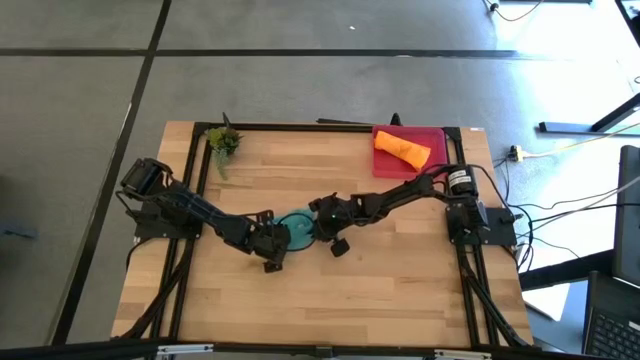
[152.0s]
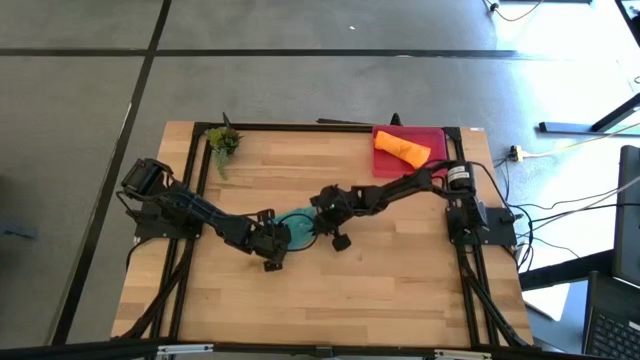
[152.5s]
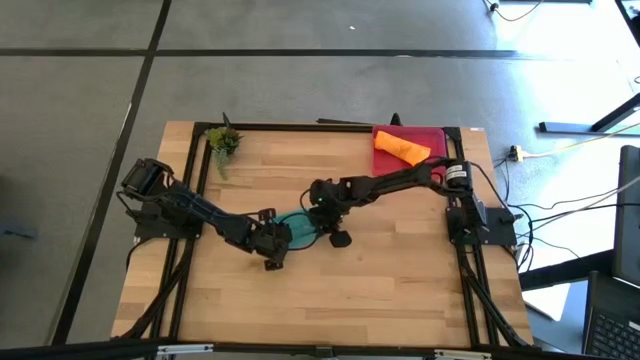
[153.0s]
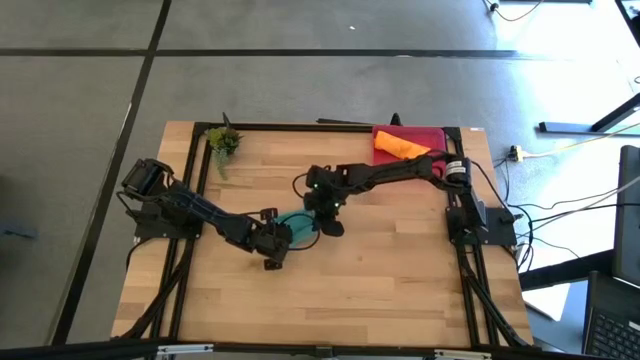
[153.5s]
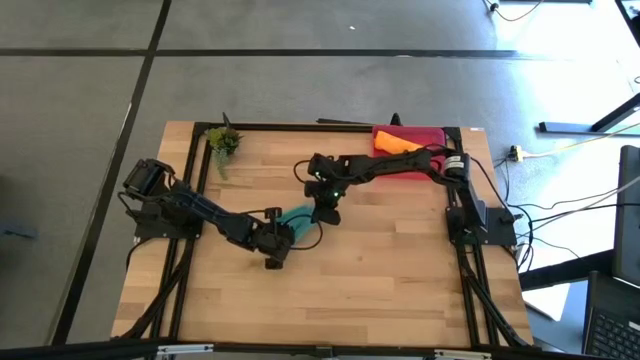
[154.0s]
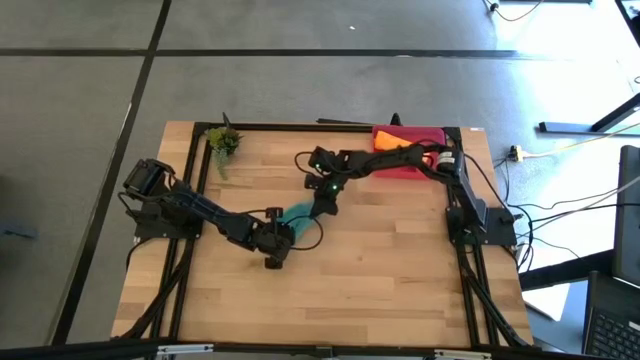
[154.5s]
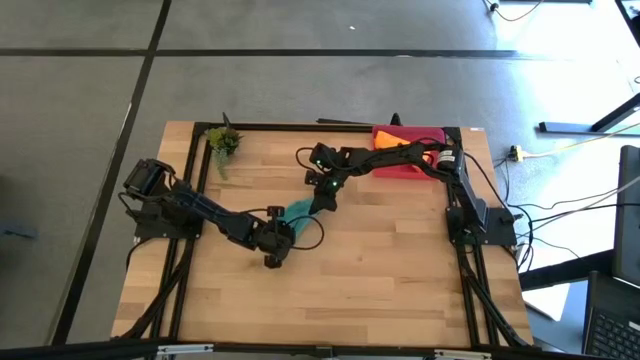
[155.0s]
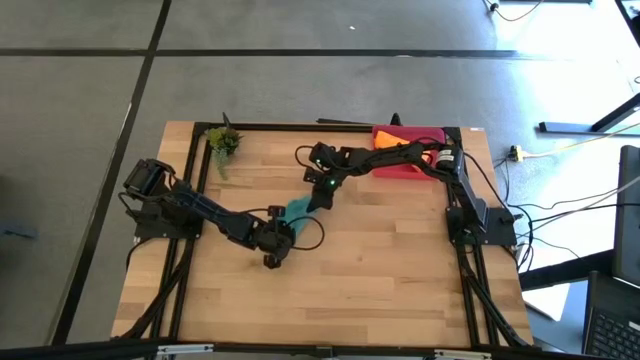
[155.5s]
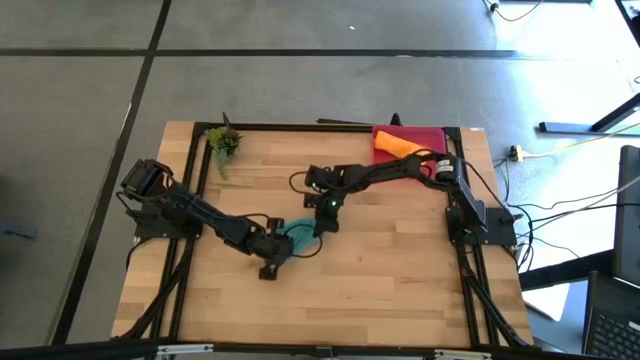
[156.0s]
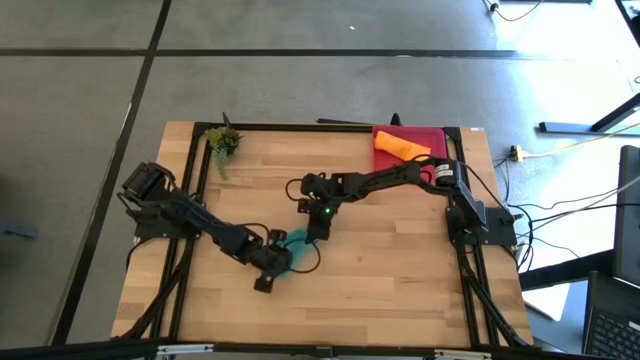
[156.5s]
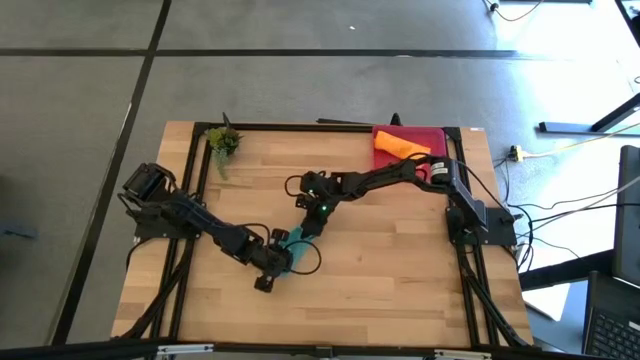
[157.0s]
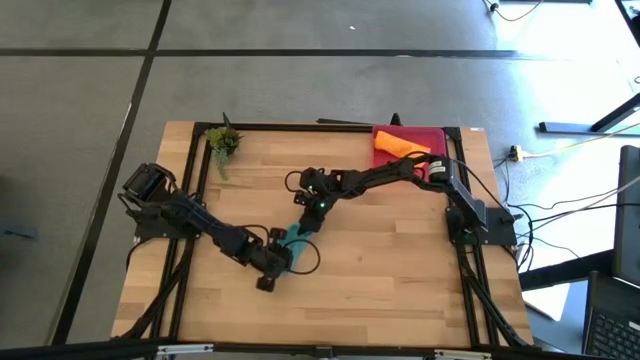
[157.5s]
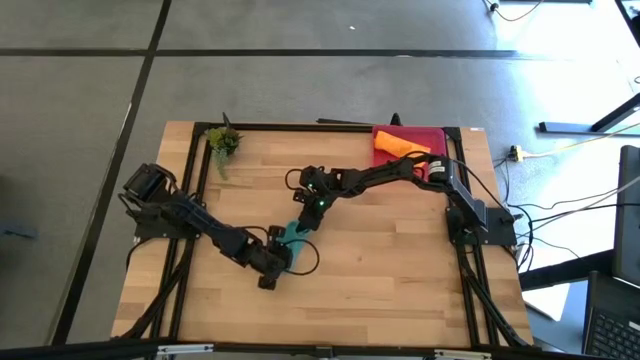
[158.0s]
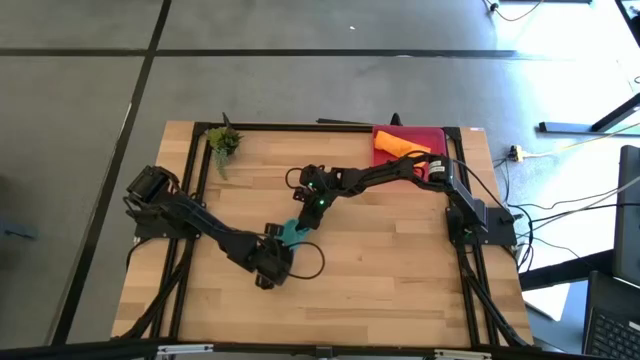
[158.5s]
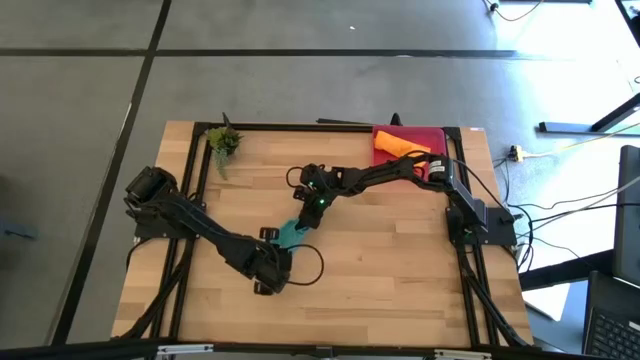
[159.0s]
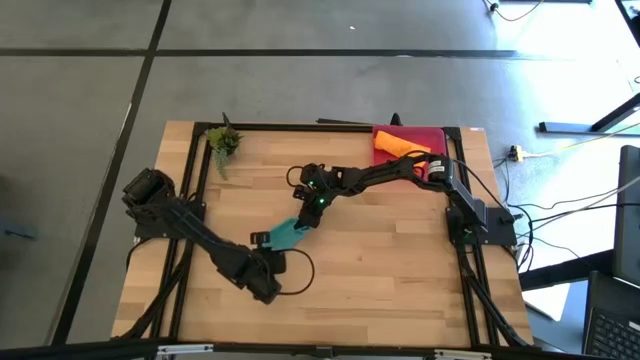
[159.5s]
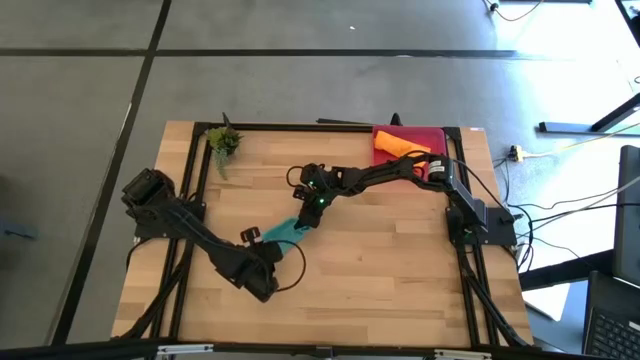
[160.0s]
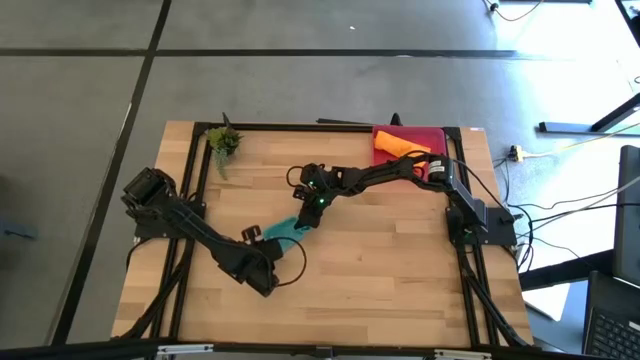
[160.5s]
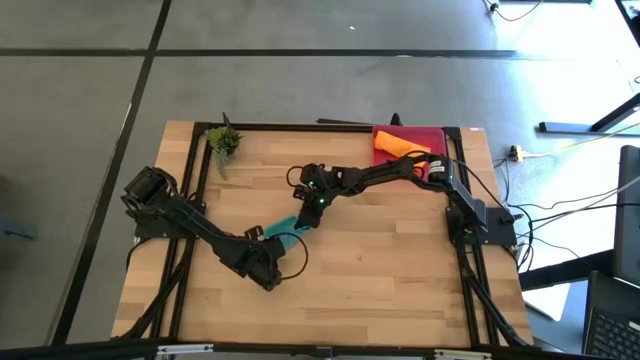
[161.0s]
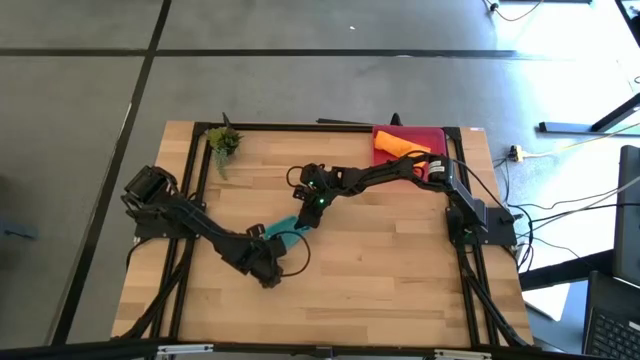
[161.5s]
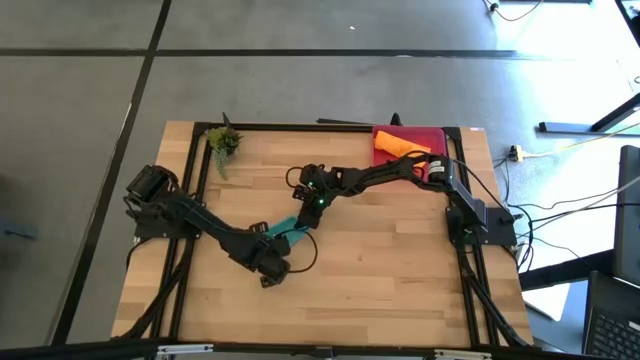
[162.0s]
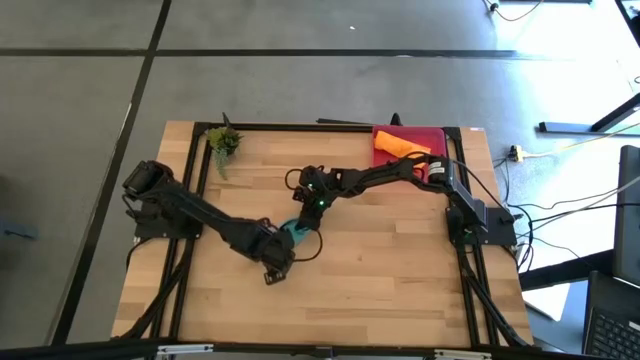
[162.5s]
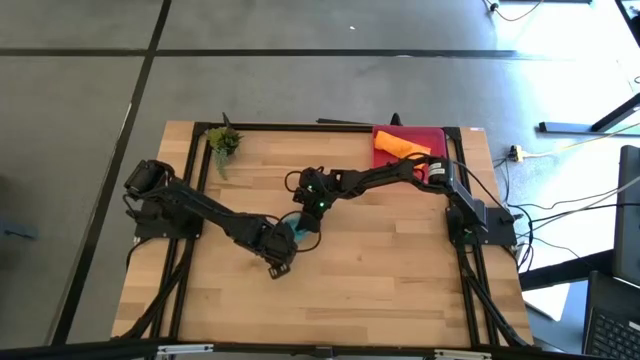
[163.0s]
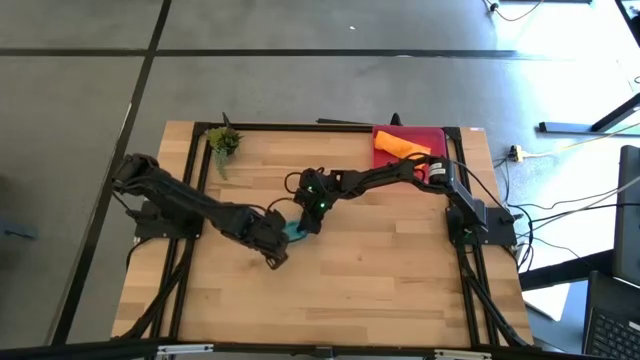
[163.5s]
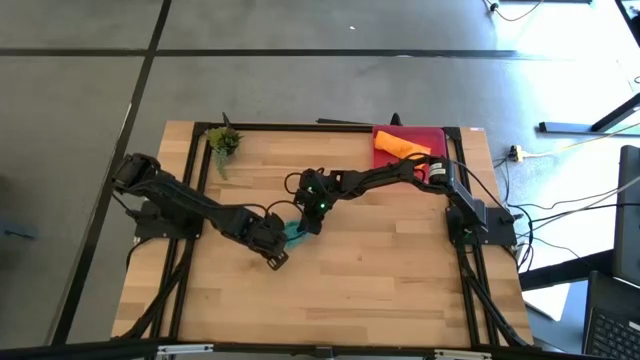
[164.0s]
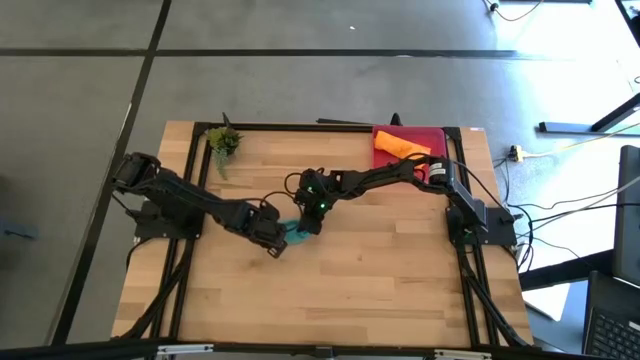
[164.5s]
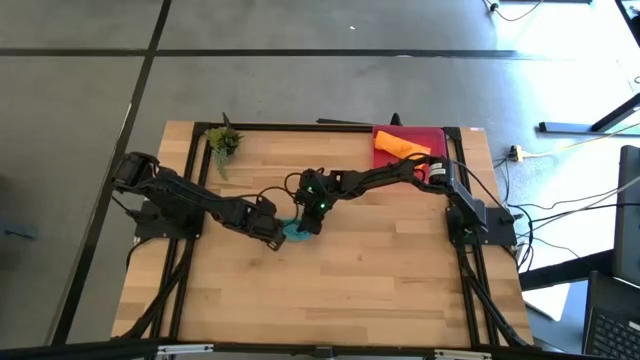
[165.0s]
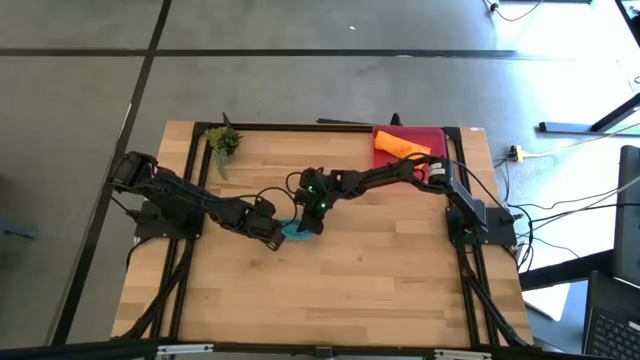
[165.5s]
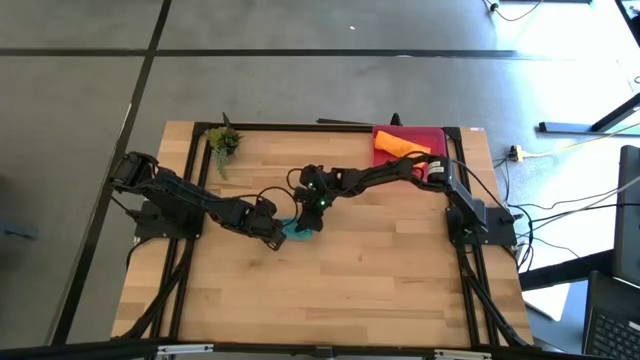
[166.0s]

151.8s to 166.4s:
Task: Roll microfiber towels into tight, uniform cylinder then place into a basket
Roll the folded blue microfiber towel
